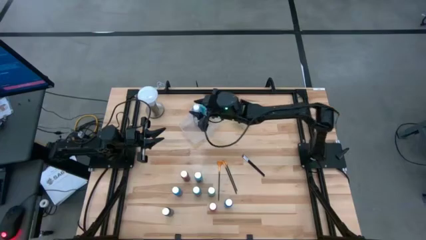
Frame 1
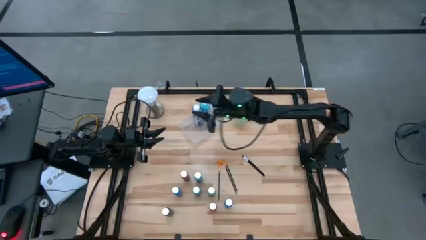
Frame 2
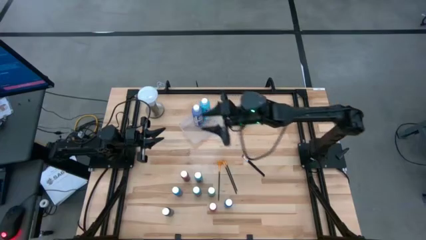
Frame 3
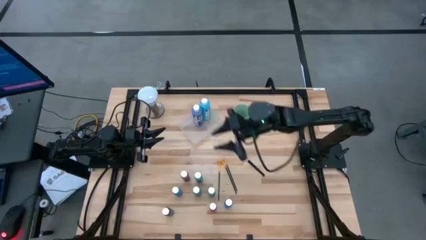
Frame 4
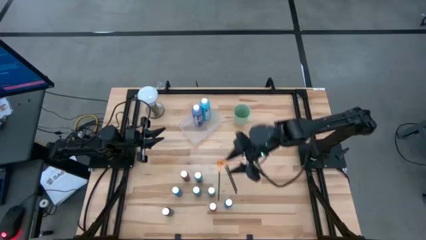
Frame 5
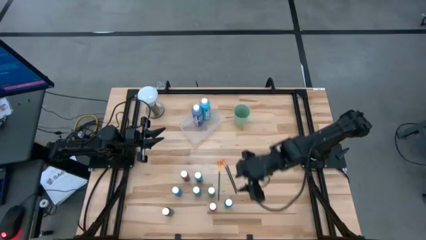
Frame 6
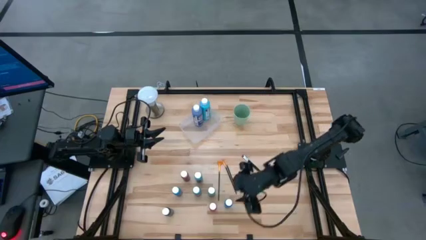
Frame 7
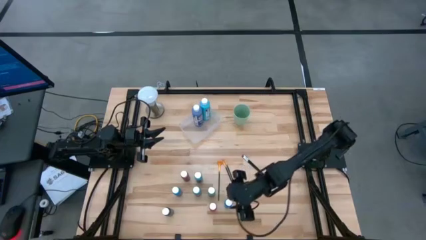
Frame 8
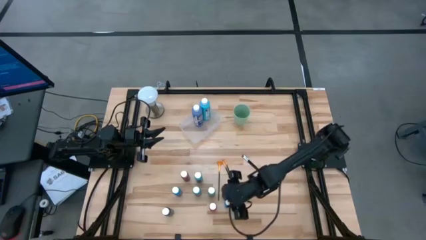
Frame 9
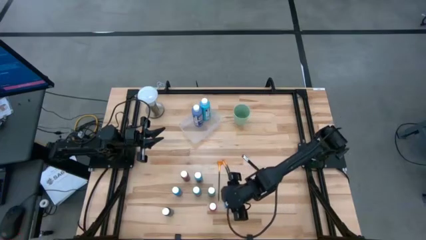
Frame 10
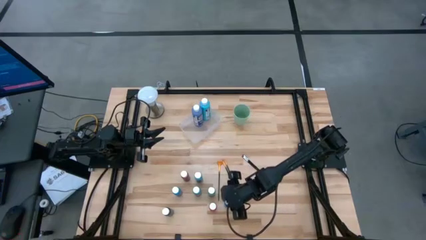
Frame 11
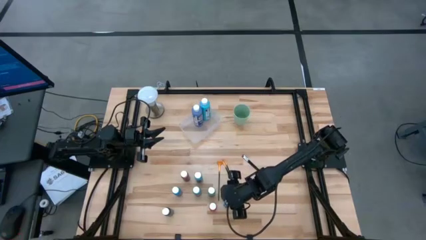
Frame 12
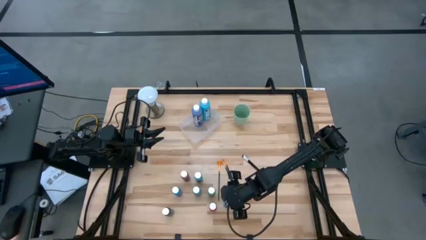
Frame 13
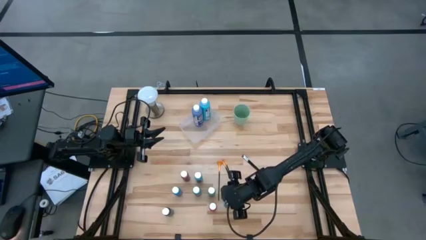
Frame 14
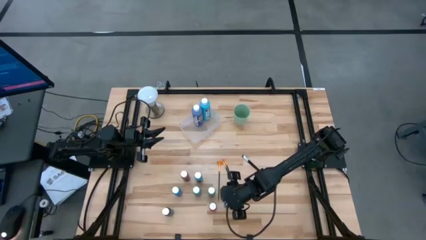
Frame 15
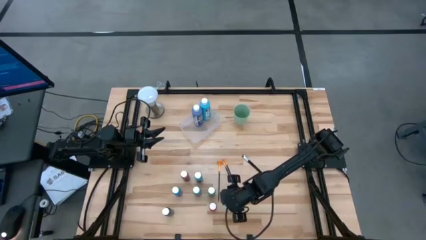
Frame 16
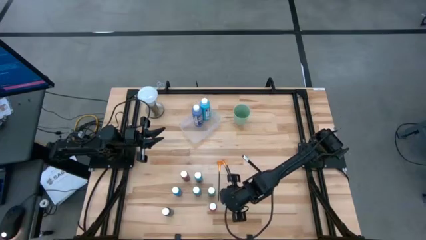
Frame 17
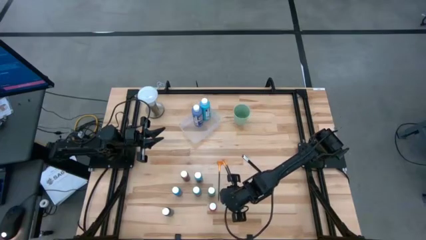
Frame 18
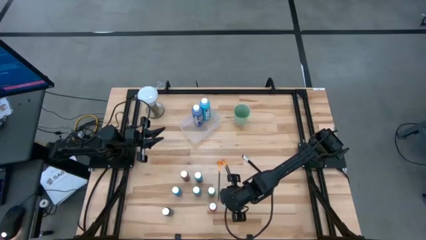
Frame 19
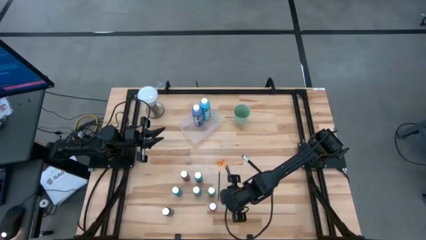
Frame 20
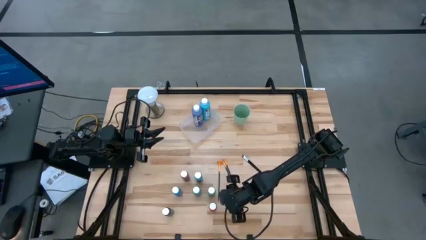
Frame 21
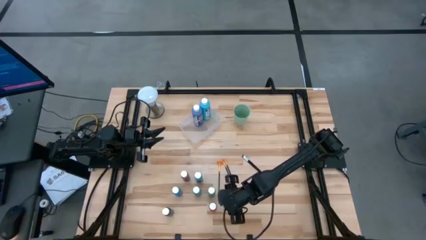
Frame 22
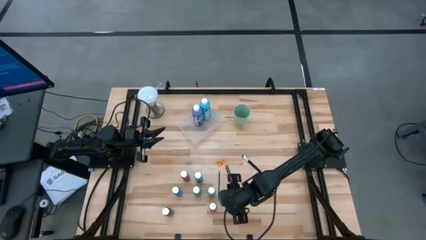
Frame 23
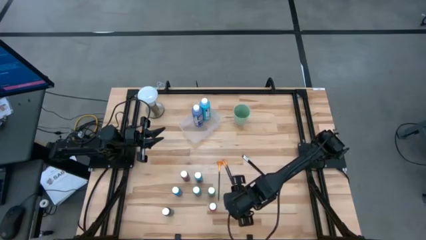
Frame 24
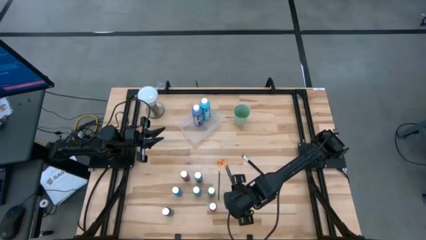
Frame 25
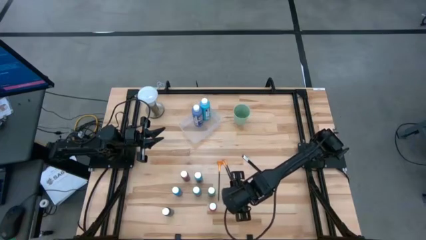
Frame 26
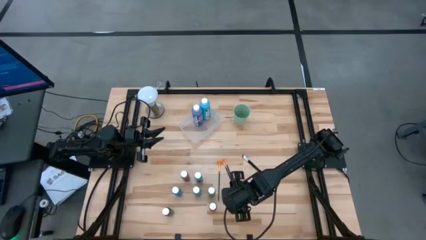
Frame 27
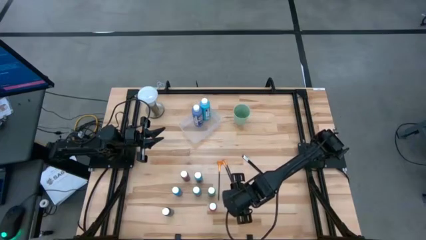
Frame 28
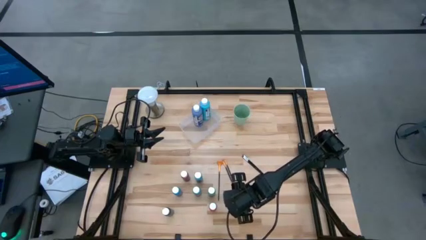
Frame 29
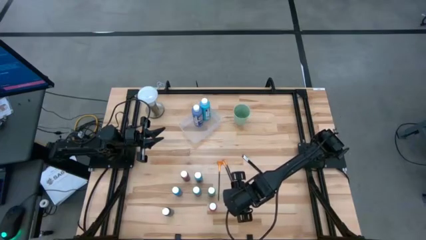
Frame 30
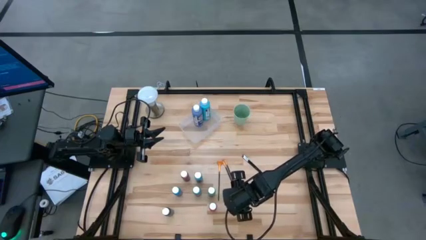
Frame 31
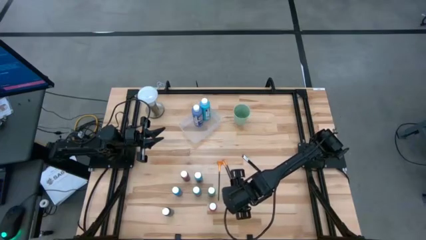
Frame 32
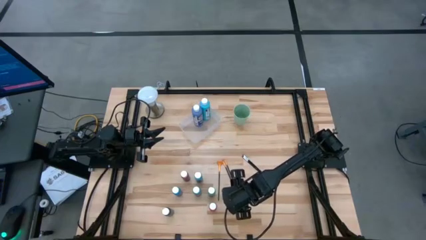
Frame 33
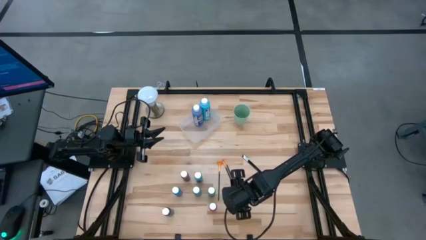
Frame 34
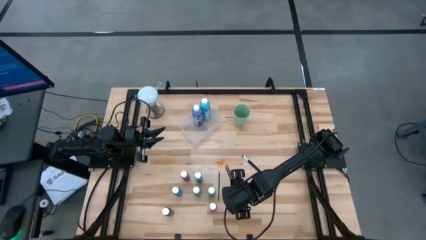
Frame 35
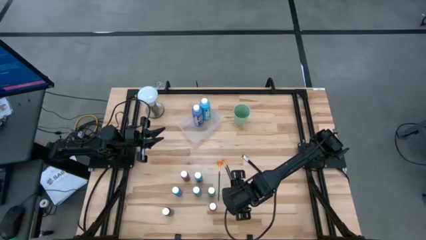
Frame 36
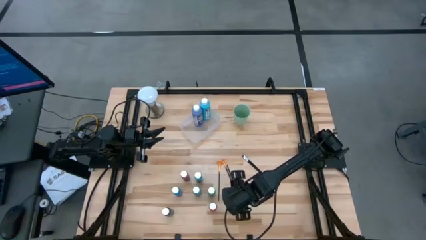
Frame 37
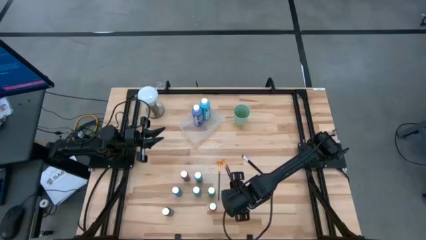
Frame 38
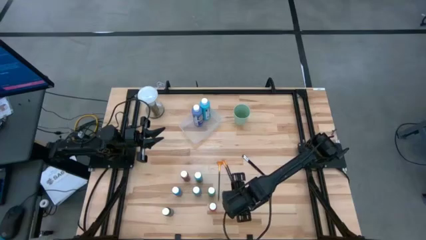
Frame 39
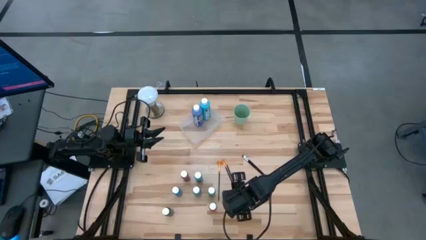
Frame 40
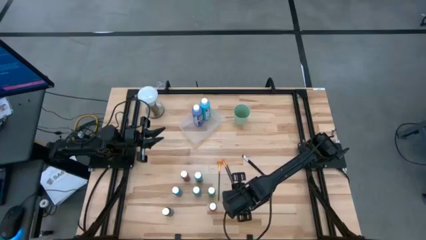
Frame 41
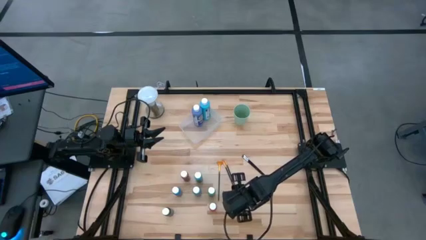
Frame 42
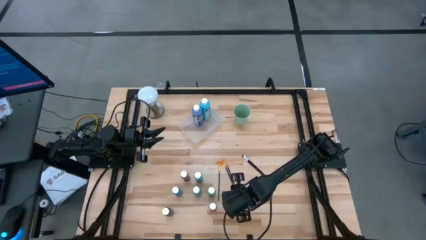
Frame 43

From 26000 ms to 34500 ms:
Task: Pick & Place Paint Supplies
Put the right small blue paint bottle into the transparent bin

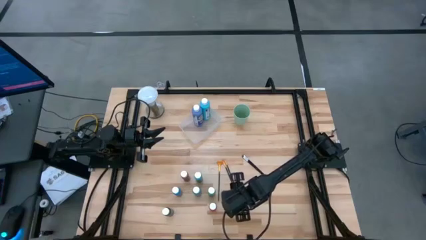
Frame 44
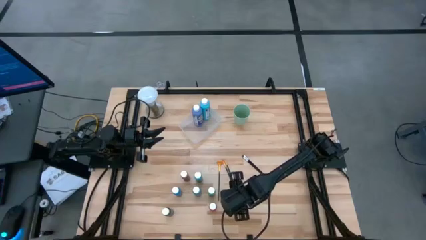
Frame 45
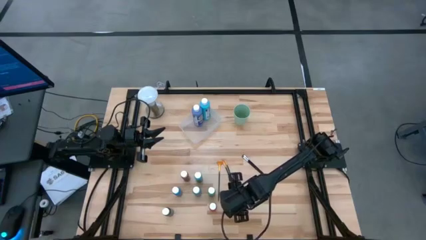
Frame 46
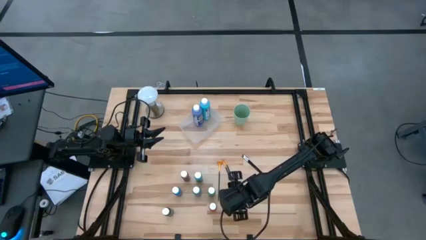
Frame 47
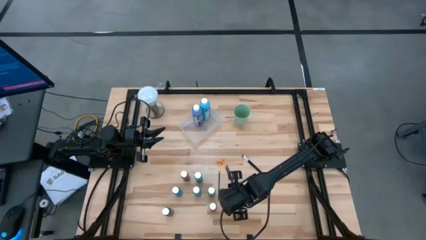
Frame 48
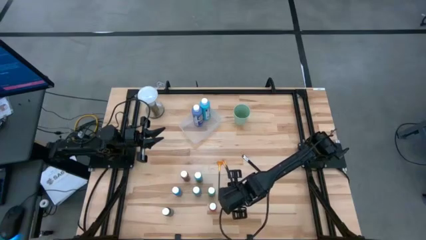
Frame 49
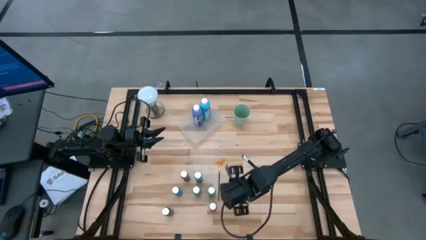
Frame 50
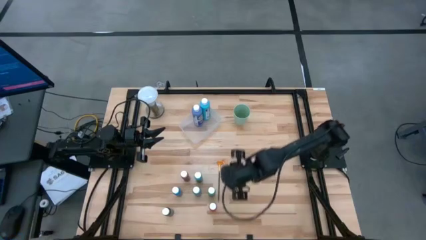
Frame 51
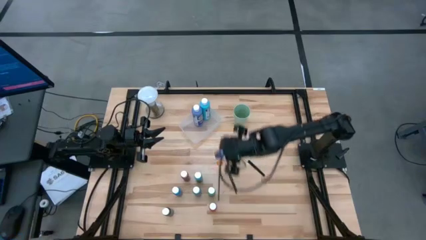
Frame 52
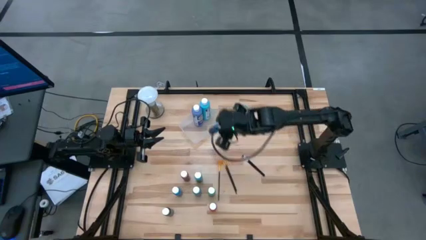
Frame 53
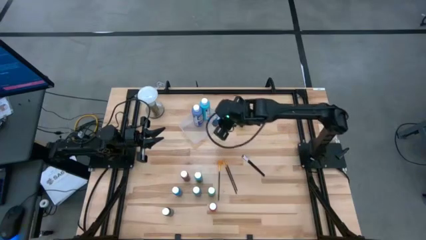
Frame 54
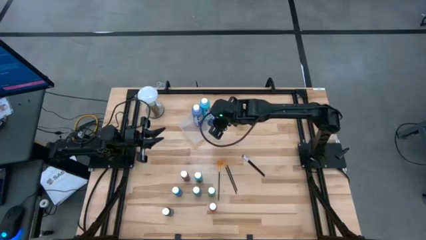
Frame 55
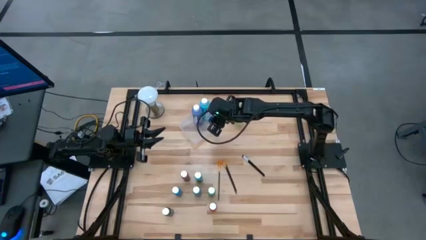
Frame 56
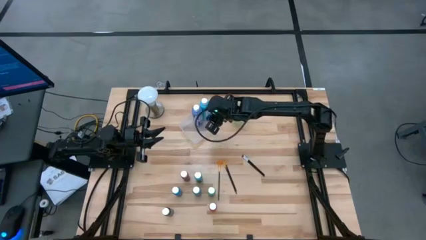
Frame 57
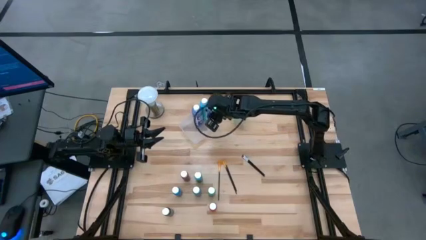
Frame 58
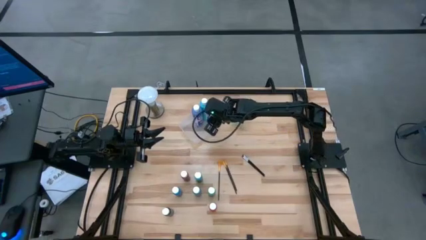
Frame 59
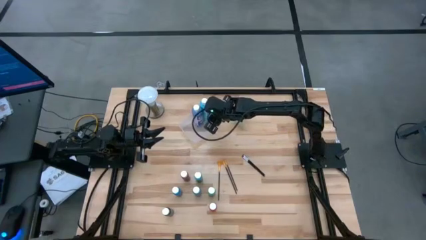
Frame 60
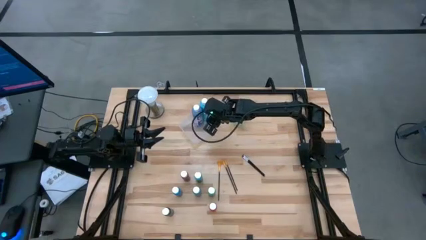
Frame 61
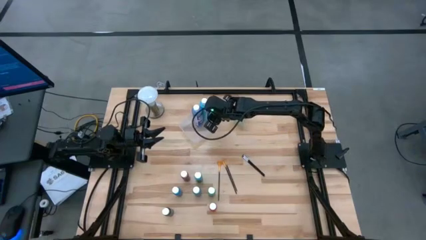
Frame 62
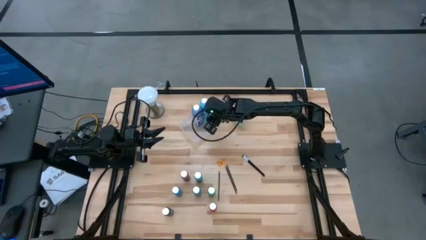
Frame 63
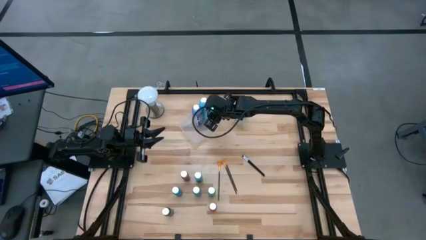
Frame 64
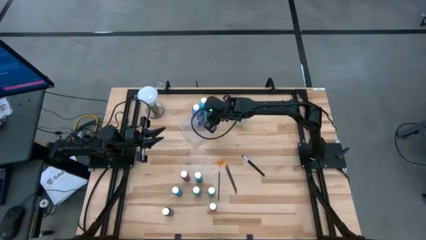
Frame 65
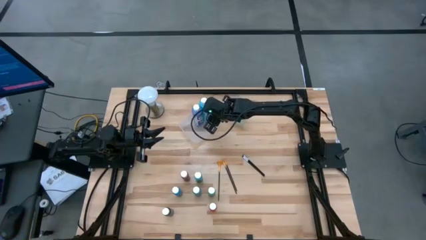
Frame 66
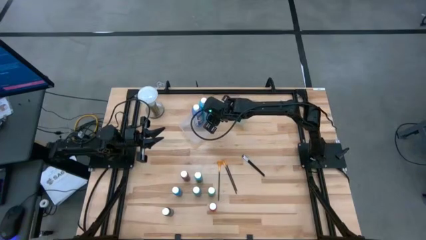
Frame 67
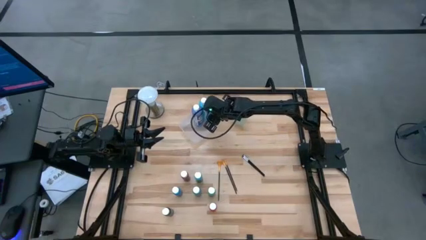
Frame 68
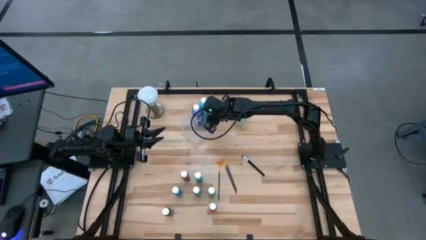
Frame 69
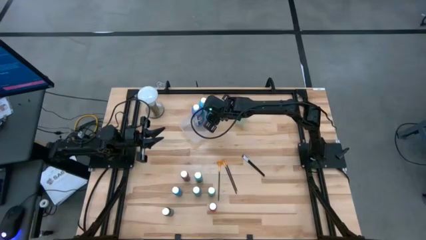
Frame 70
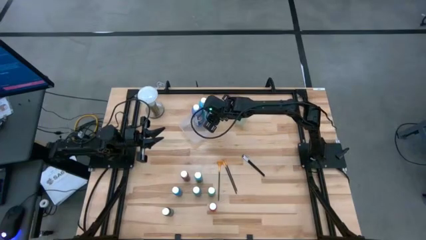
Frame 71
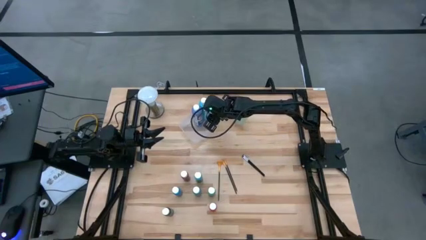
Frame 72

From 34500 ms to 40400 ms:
Put the right small blue paint bottle into the transparent bin

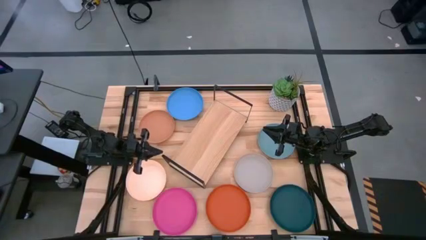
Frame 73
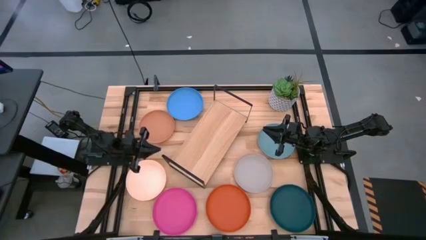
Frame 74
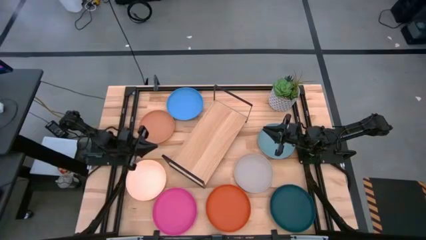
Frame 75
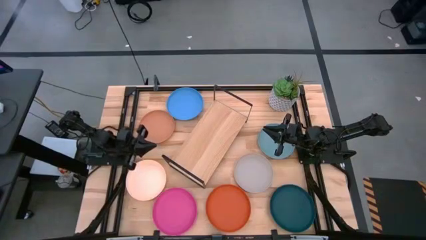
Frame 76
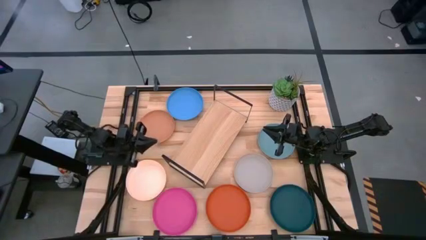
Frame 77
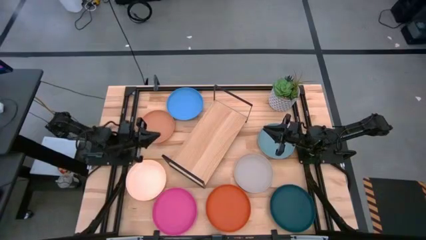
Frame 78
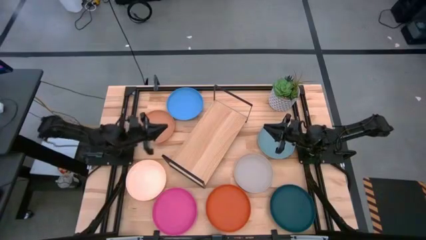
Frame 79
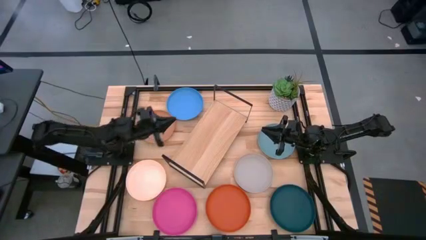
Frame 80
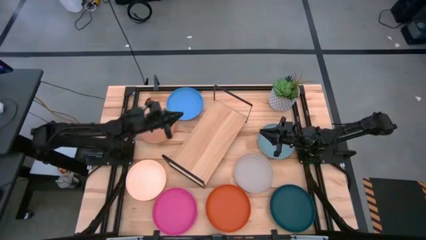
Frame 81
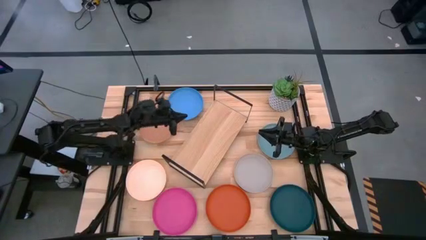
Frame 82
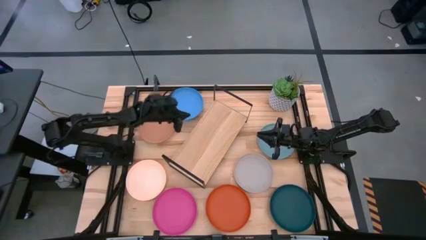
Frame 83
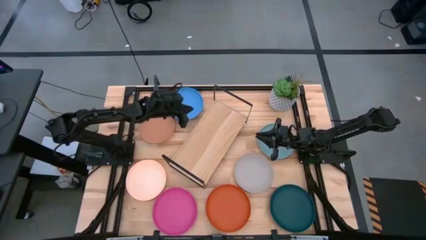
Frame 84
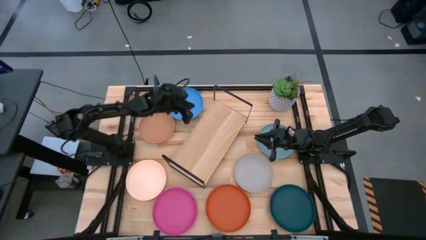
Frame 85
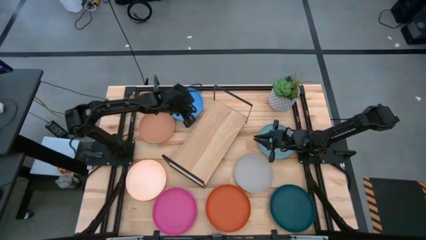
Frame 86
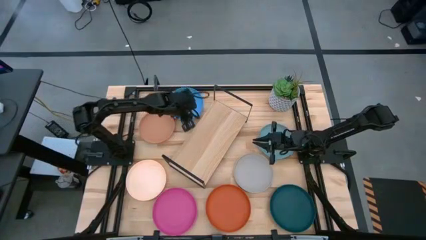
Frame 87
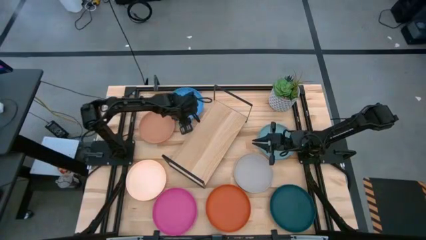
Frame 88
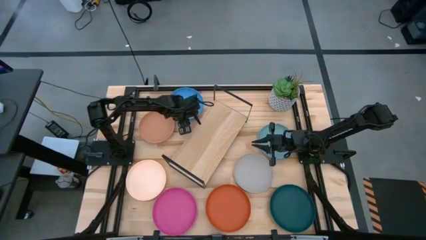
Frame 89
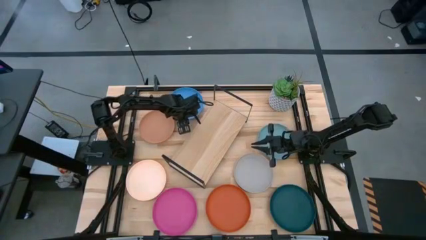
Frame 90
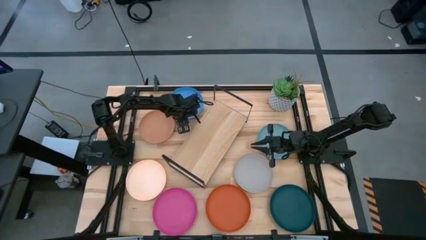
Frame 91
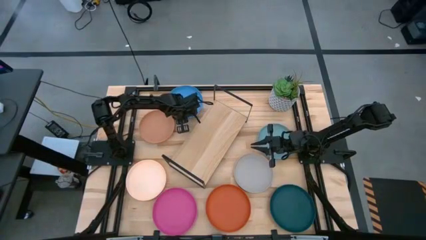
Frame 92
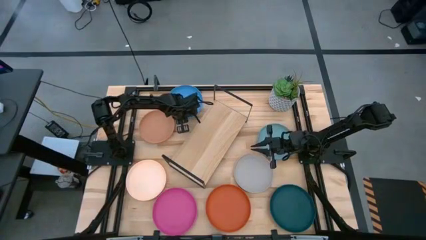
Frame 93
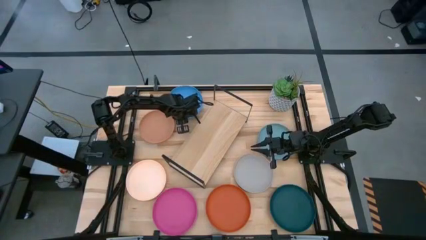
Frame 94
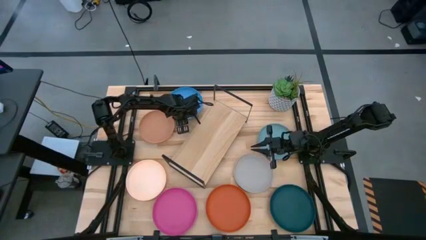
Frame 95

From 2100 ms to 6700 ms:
Task: Place and stack plates onto a shelf
Put the blue plate on the shelf
